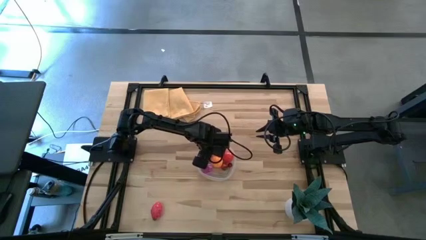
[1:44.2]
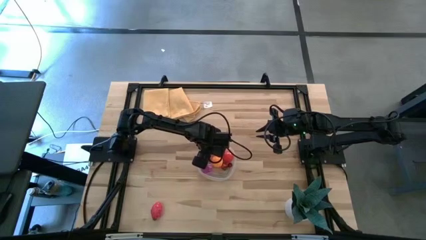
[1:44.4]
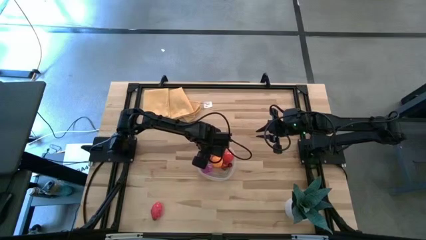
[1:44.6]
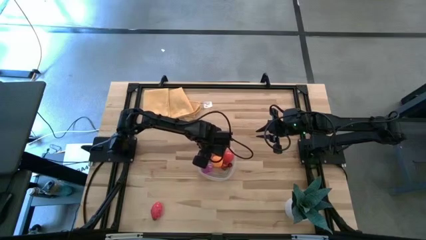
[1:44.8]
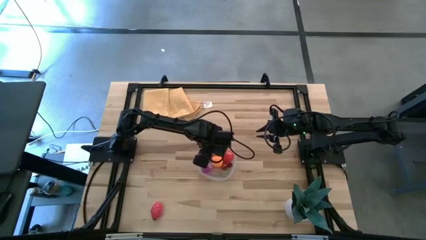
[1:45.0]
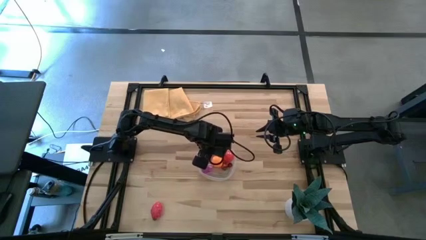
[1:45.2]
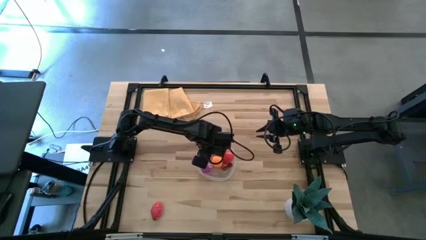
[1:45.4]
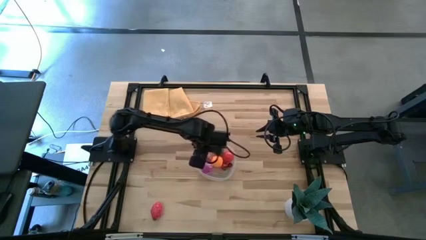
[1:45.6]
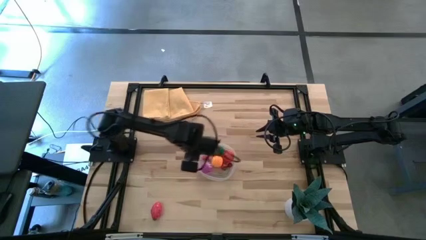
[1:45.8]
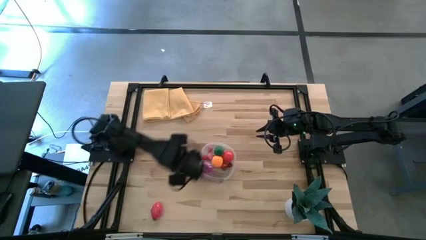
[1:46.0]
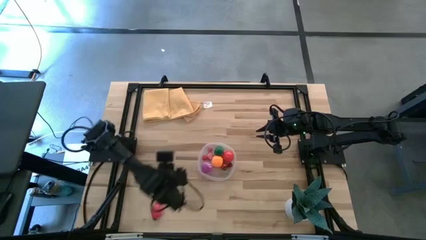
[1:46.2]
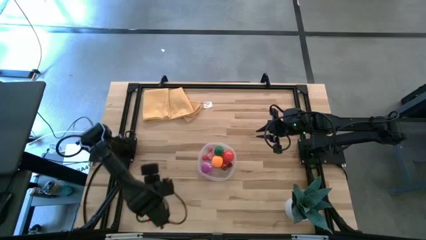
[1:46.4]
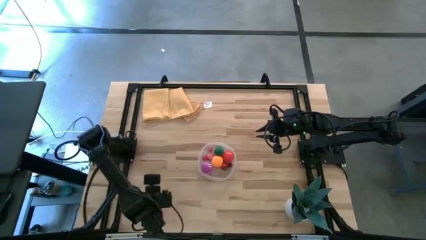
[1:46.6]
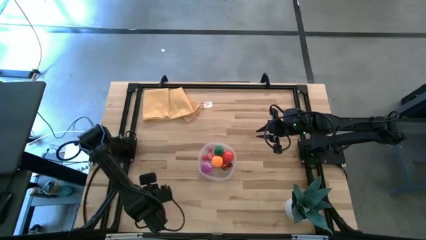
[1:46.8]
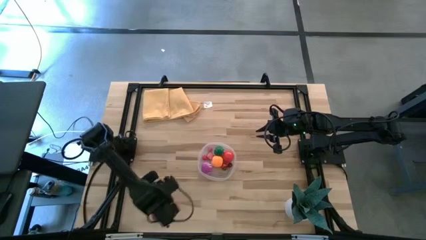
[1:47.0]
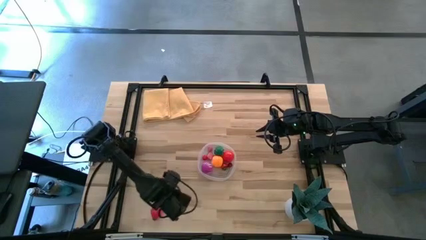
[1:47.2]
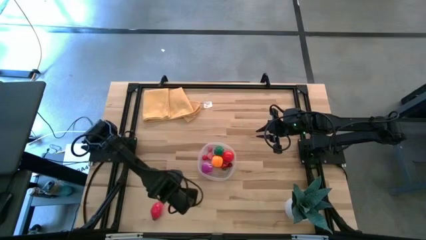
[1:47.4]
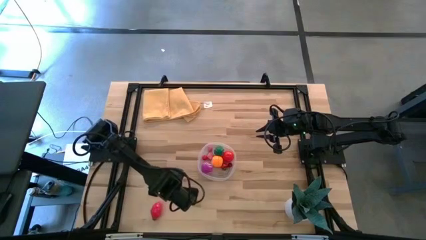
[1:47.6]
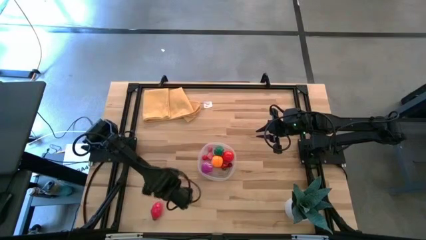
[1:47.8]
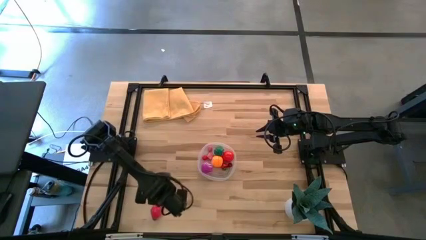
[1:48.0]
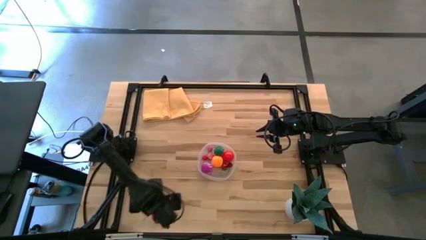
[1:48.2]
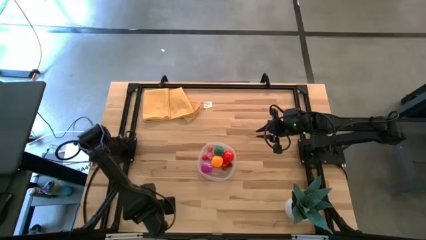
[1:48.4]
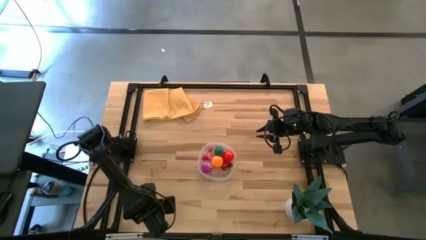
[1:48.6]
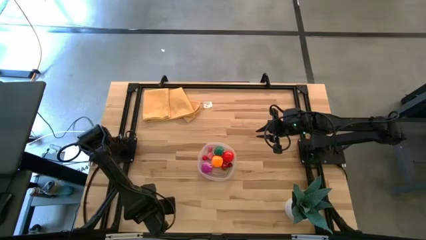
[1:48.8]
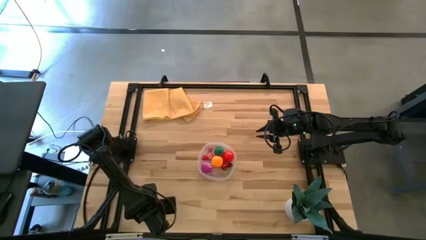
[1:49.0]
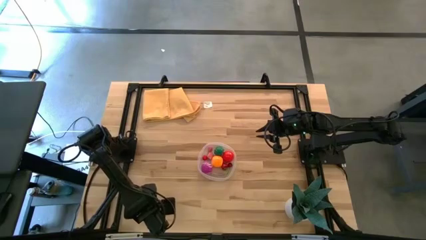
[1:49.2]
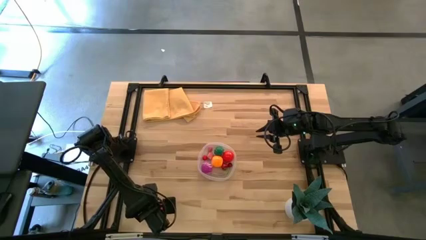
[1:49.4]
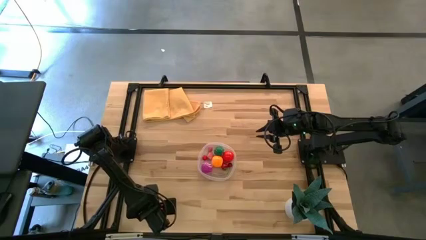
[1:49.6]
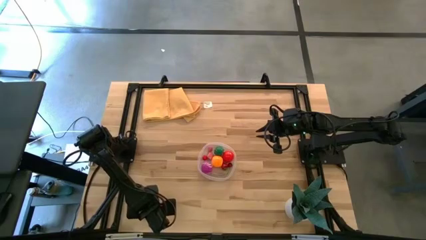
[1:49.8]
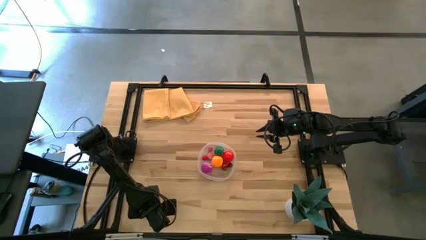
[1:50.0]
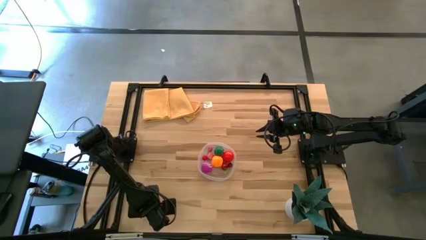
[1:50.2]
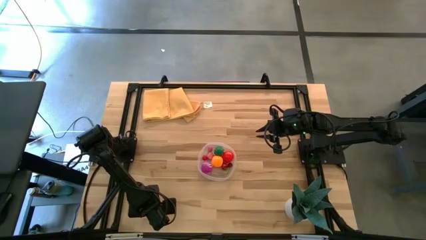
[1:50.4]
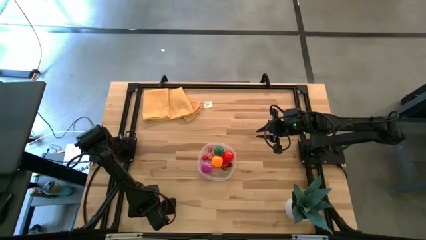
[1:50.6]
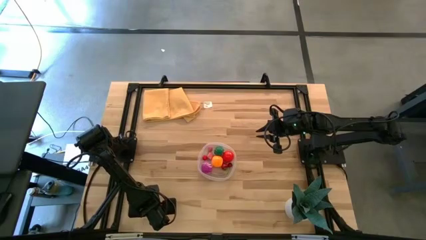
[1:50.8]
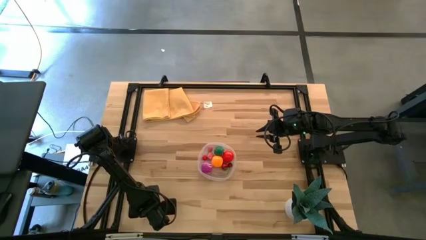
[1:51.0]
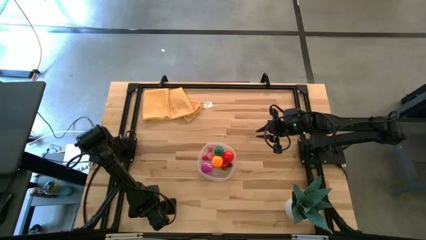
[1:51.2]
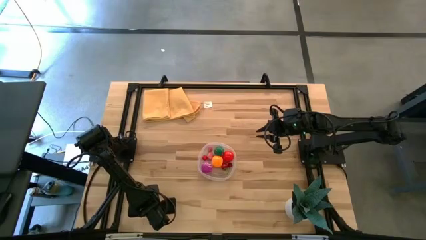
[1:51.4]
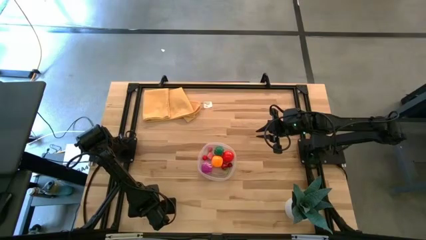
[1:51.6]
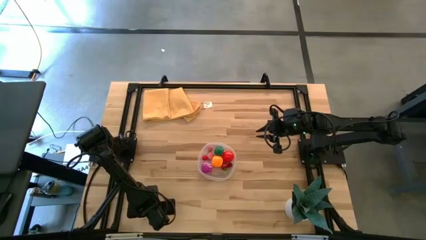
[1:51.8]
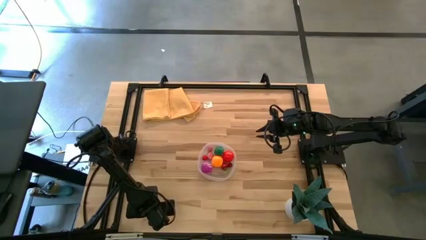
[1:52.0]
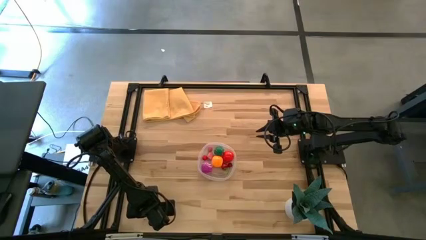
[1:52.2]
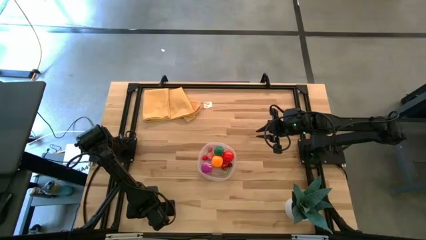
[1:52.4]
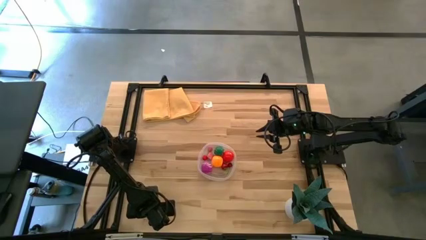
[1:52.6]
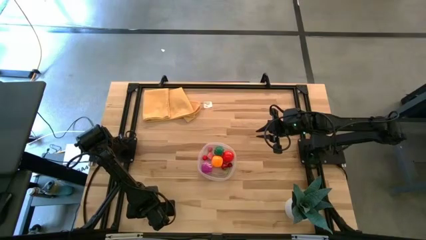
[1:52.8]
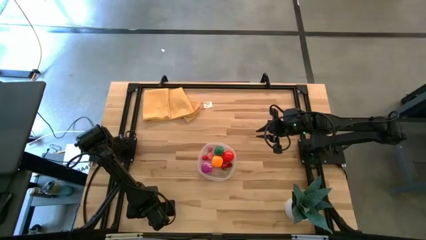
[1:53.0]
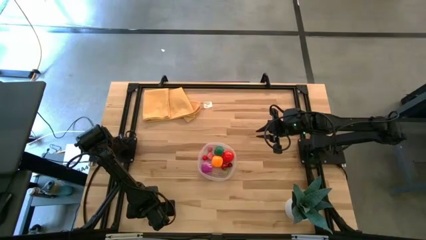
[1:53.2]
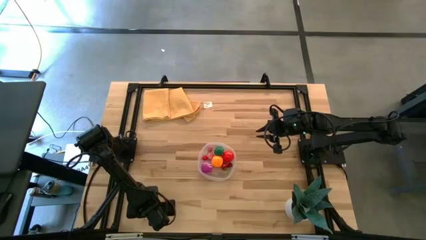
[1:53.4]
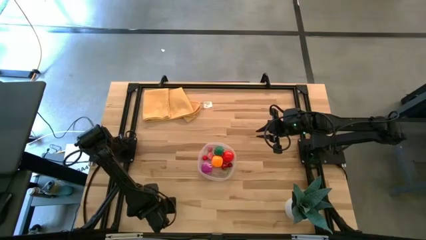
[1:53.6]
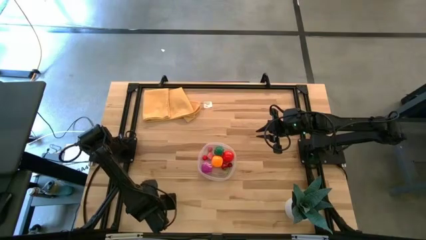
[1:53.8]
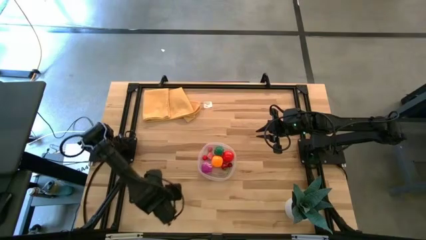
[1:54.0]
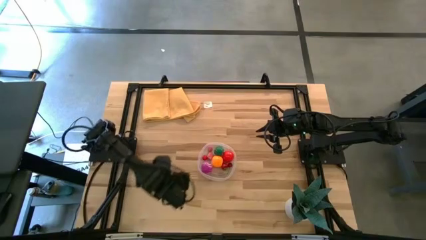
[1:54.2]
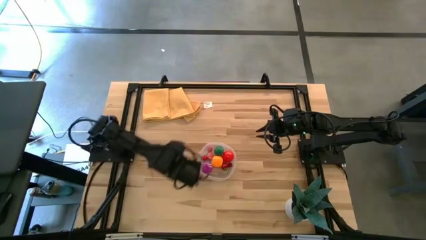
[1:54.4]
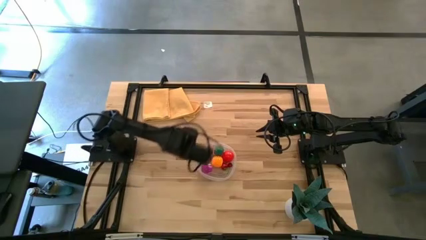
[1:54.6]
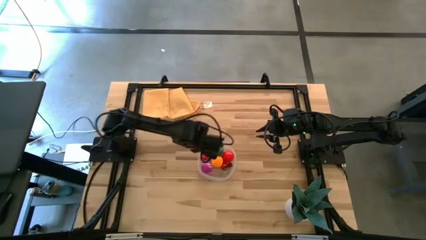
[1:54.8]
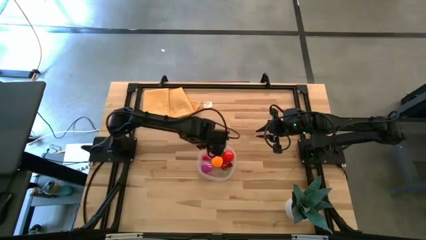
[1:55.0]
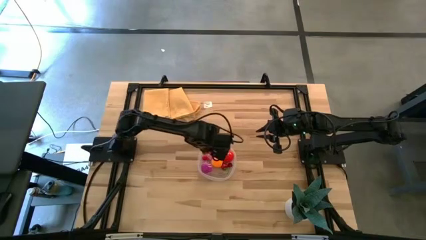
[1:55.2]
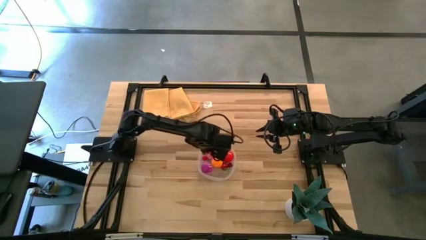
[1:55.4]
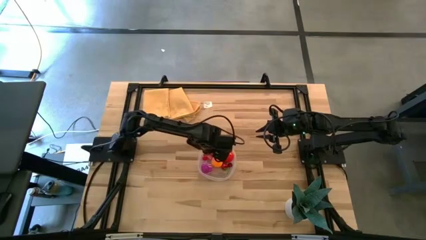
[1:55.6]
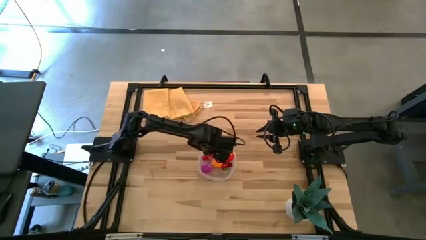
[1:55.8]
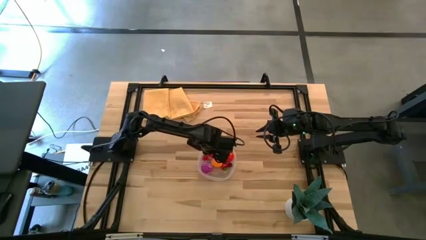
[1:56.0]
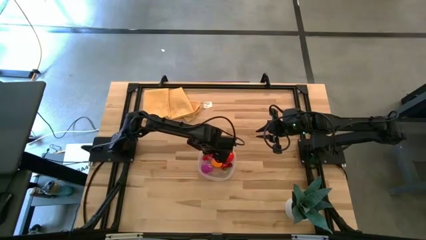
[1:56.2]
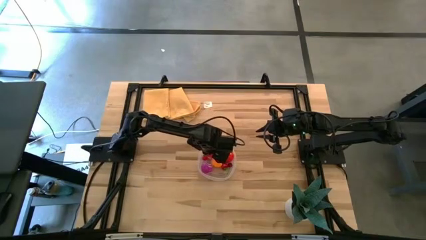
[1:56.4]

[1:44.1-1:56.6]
Task: Pick and placing Produce into tupperware
Put the pink dragon fruit into the transparent bin

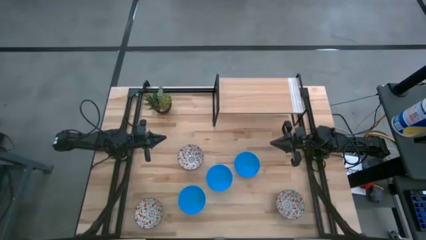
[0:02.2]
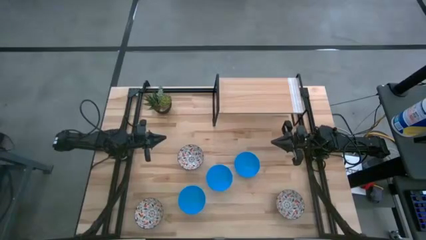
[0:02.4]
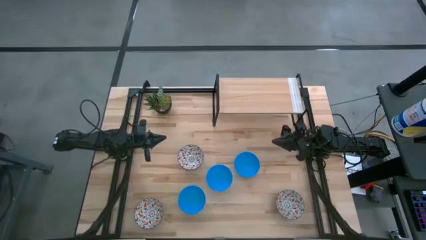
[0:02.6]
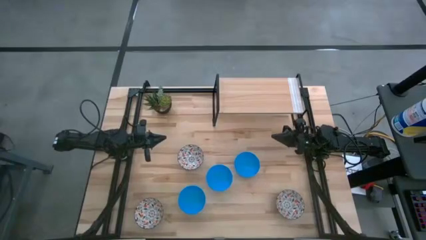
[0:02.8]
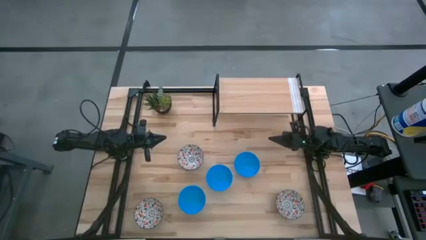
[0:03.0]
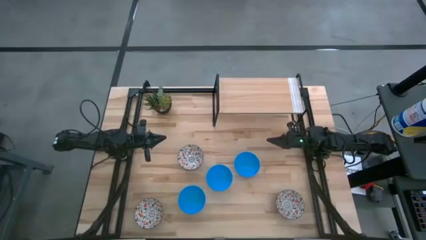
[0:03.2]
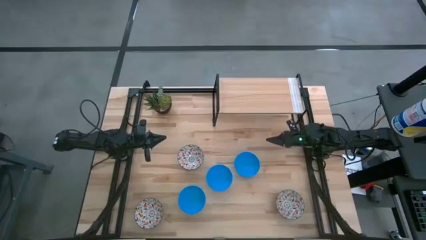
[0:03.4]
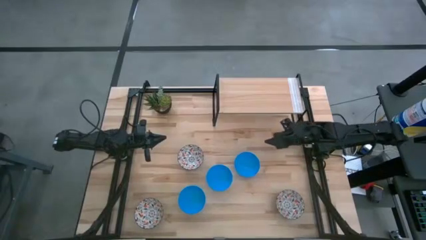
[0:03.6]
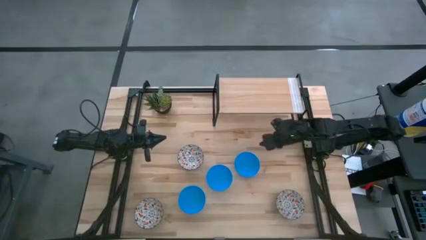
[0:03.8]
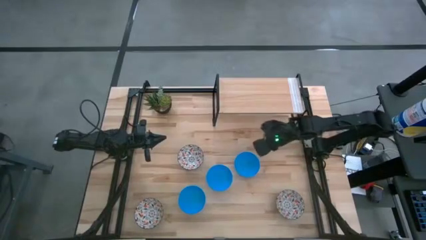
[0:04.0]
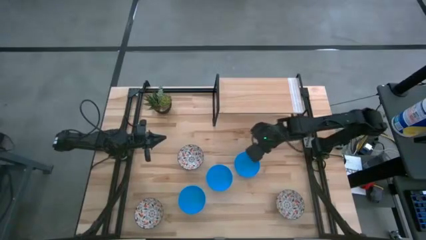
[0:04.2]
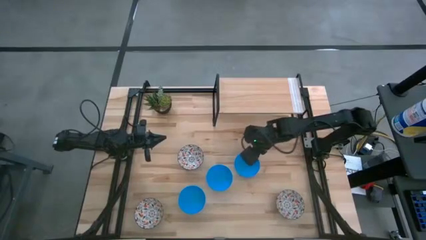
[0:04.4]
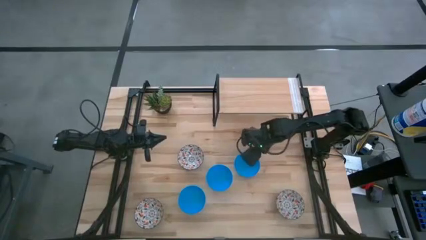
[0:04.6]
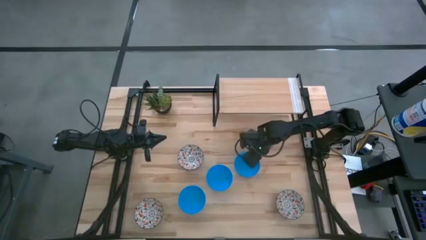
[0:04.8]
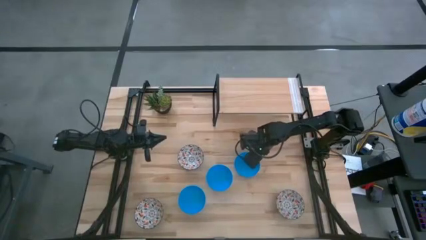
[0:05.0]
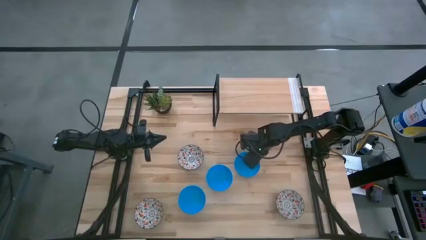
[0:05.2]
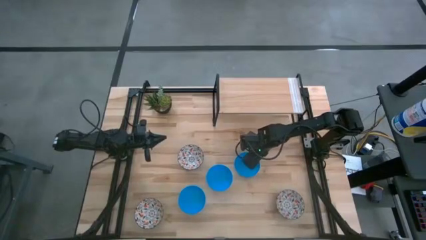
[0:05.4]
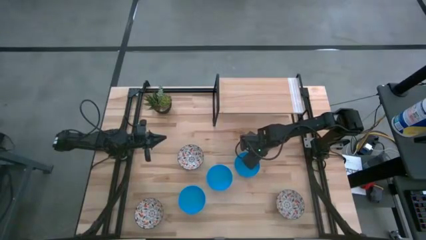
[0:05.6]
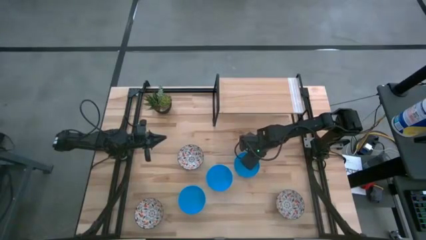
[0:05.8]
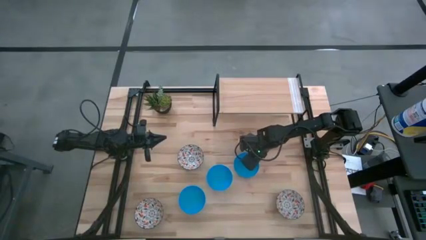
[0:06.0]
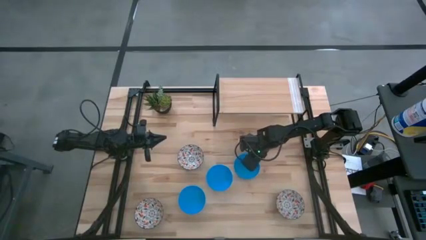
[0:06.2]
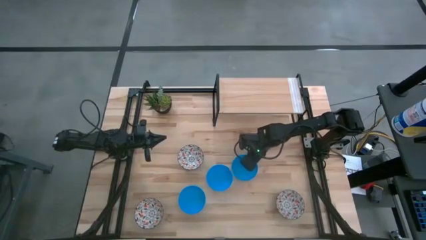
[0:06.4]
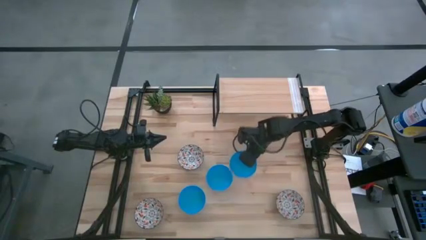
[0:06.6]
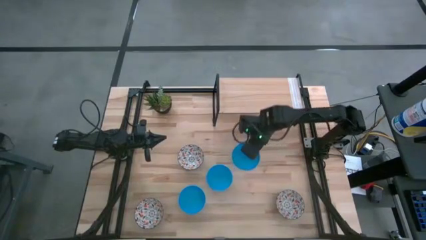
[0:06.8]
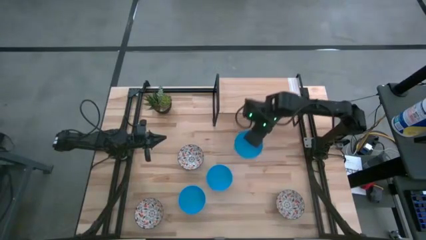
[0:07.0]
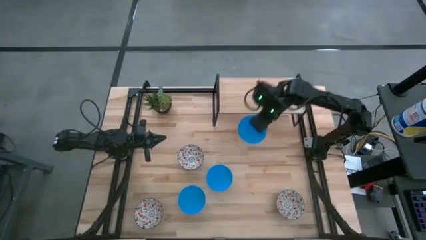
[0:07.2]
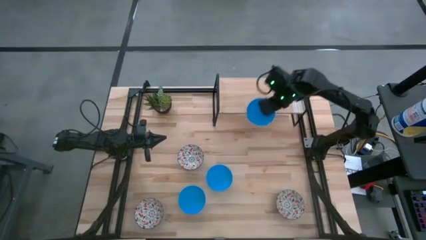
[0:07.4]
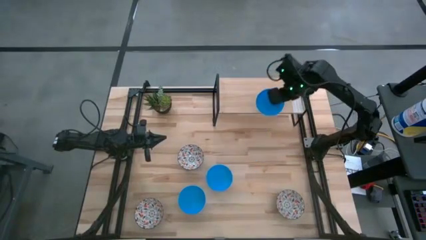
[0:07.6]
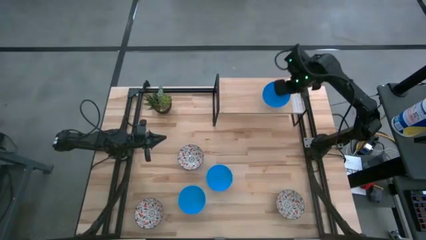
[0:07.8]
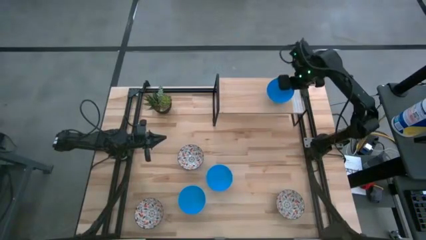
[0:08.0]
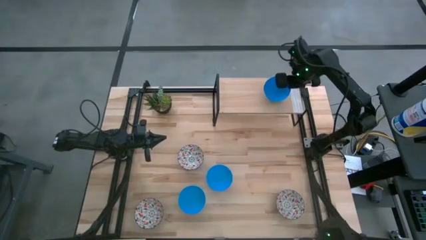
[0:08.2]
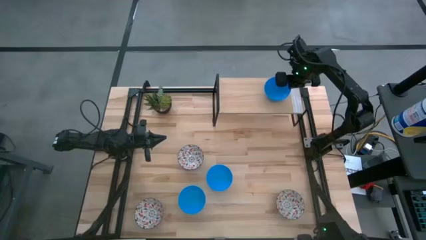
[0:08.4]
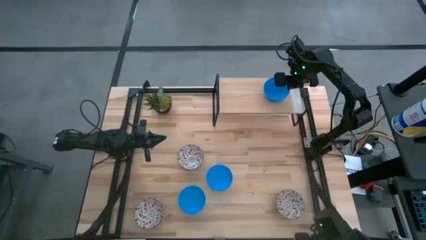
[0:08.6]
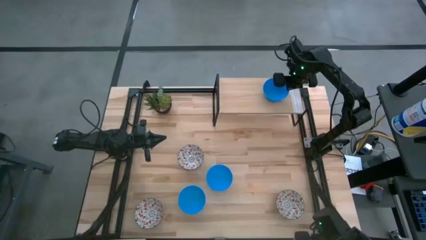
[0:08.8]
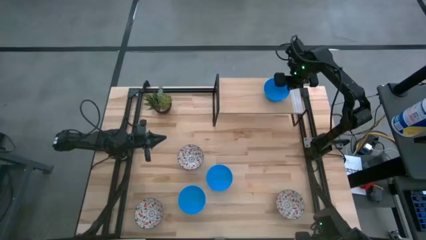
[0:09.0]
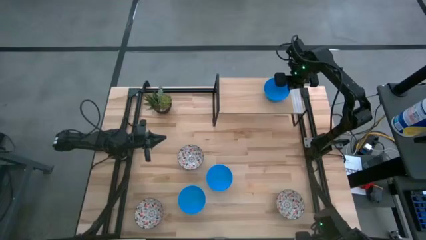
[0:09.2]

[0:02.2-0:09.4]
Task: Pick & Place Mini bowls
Put the top blue bowl on the shelf
